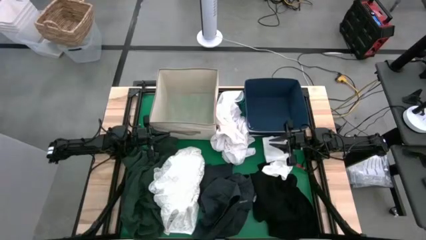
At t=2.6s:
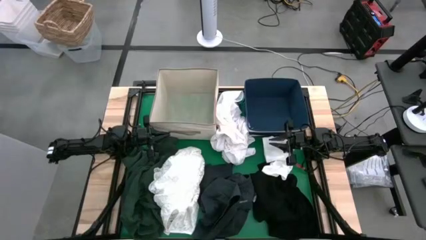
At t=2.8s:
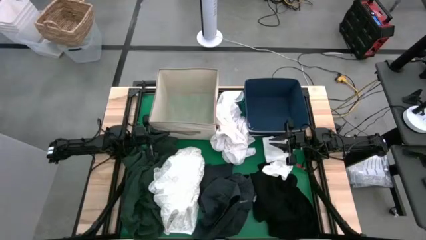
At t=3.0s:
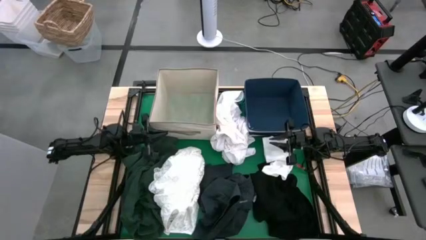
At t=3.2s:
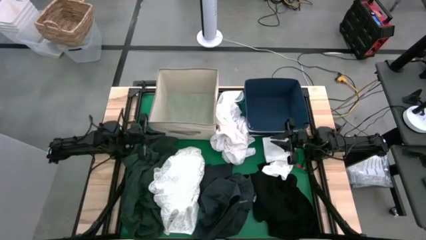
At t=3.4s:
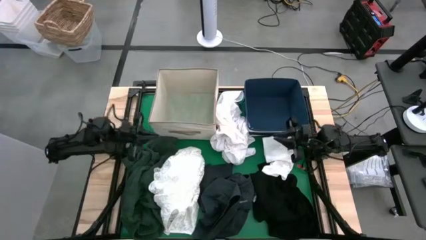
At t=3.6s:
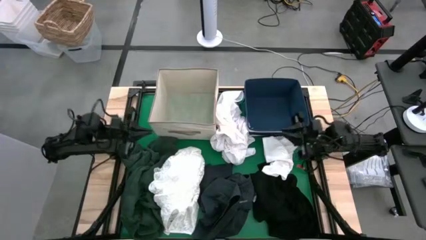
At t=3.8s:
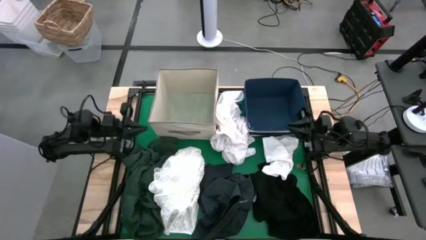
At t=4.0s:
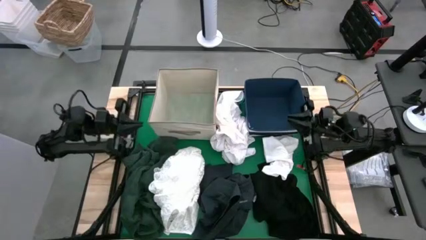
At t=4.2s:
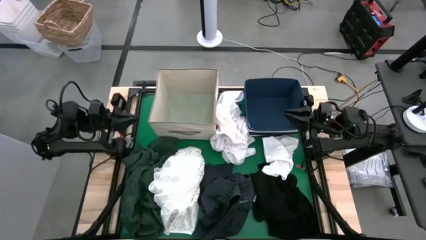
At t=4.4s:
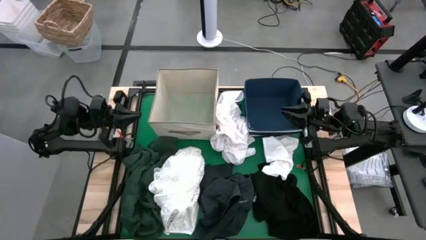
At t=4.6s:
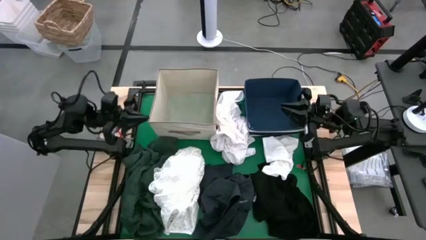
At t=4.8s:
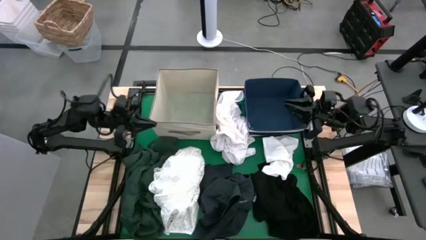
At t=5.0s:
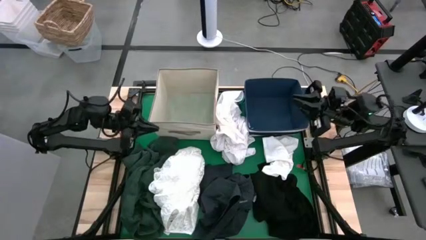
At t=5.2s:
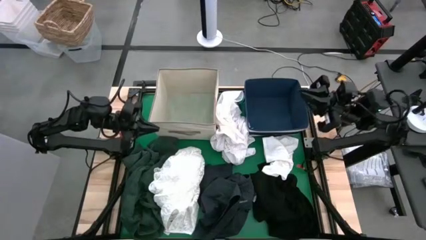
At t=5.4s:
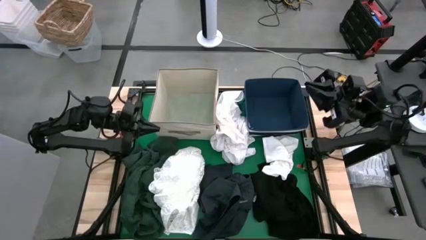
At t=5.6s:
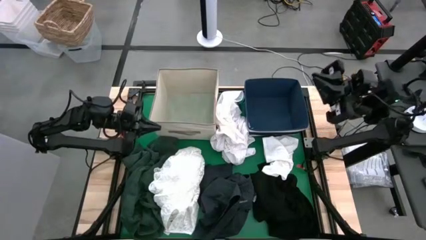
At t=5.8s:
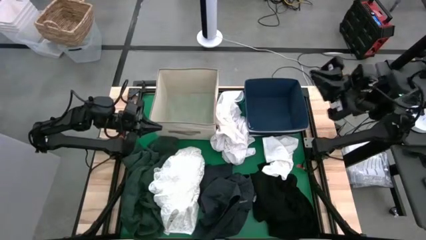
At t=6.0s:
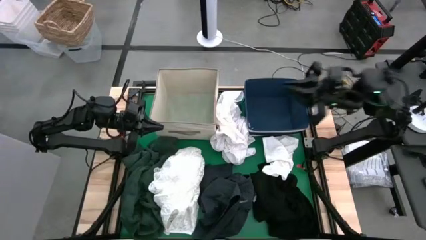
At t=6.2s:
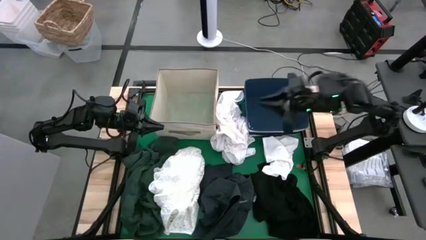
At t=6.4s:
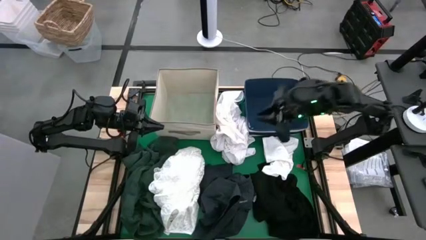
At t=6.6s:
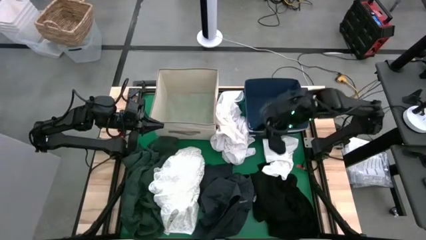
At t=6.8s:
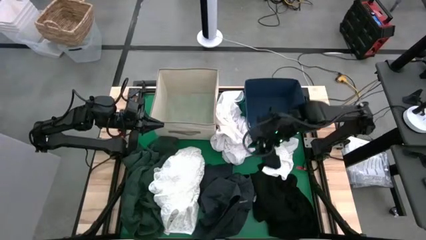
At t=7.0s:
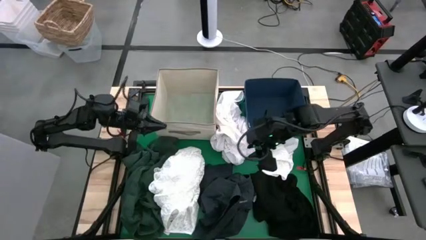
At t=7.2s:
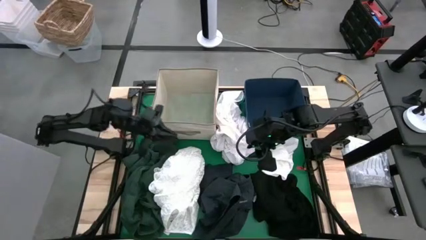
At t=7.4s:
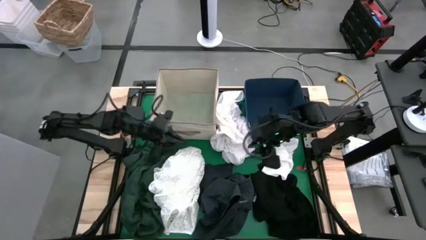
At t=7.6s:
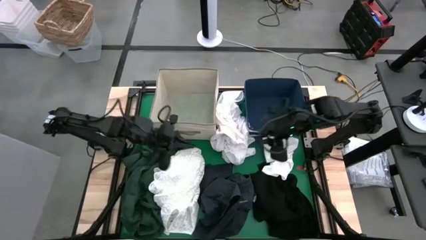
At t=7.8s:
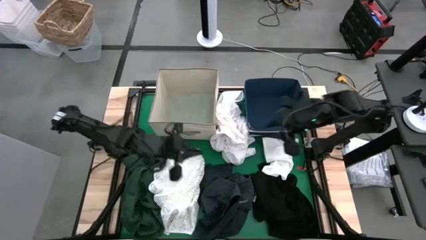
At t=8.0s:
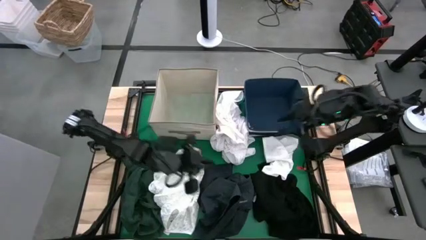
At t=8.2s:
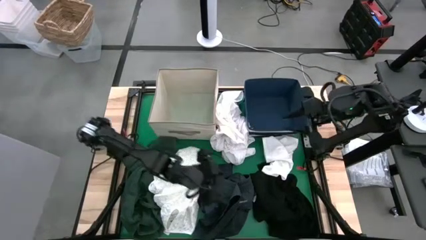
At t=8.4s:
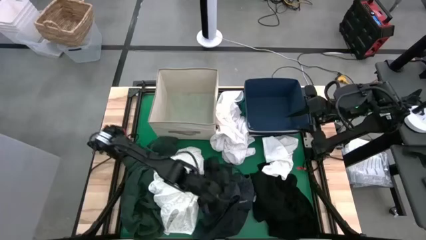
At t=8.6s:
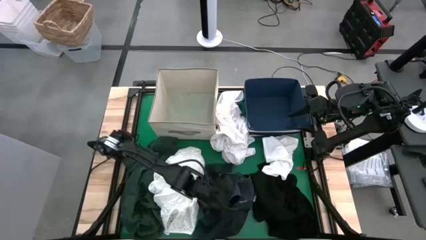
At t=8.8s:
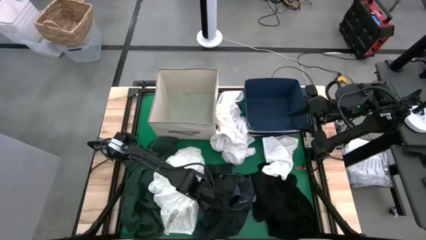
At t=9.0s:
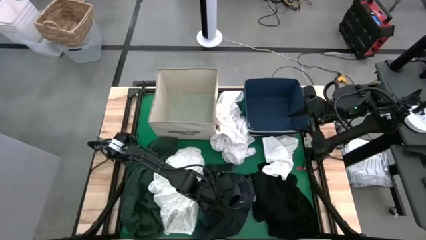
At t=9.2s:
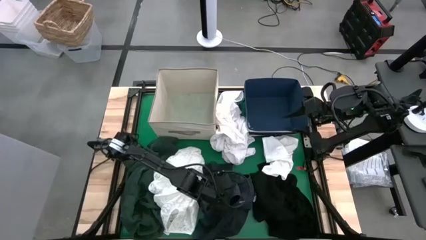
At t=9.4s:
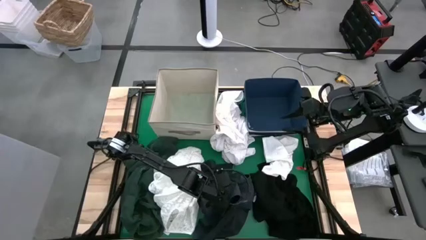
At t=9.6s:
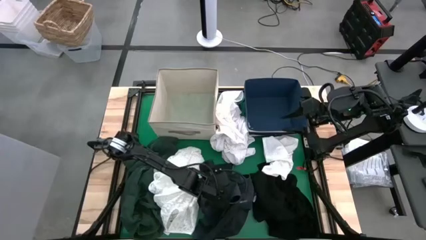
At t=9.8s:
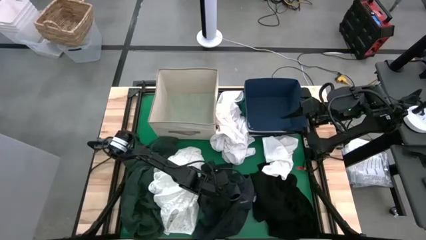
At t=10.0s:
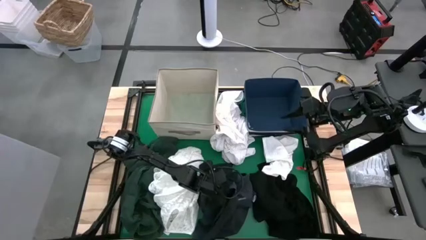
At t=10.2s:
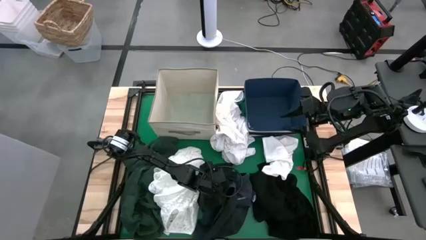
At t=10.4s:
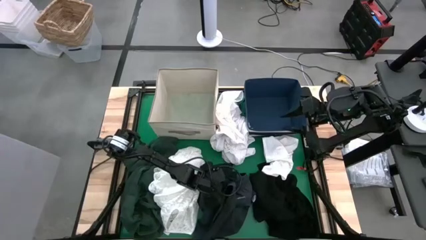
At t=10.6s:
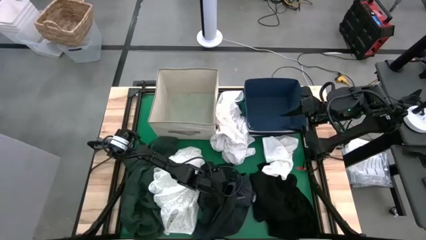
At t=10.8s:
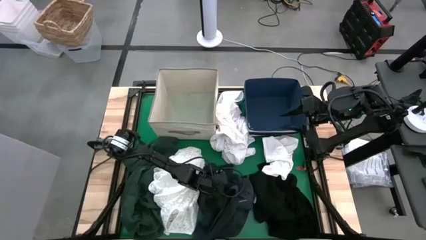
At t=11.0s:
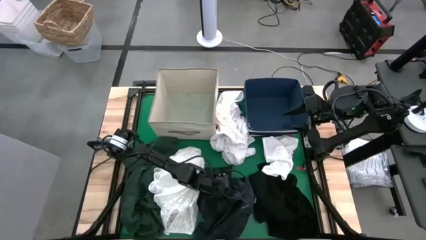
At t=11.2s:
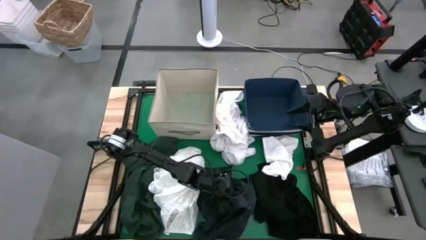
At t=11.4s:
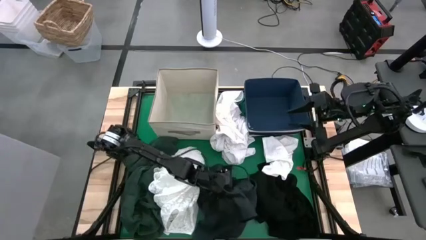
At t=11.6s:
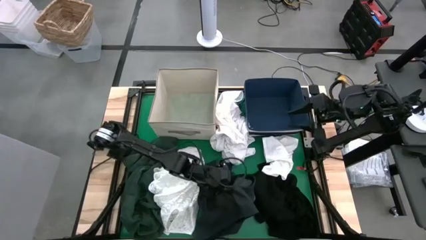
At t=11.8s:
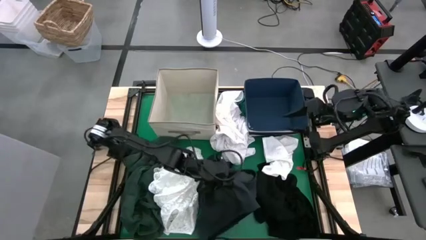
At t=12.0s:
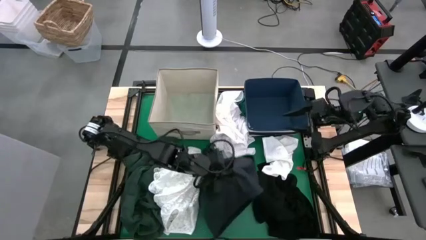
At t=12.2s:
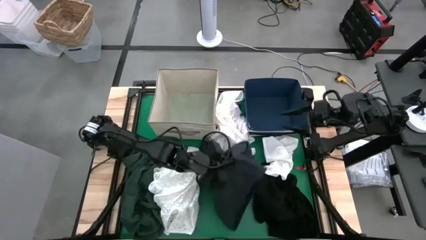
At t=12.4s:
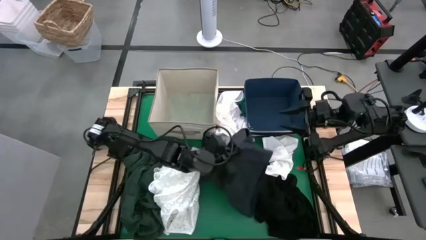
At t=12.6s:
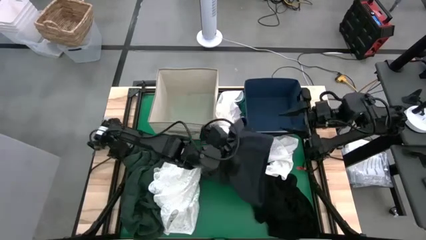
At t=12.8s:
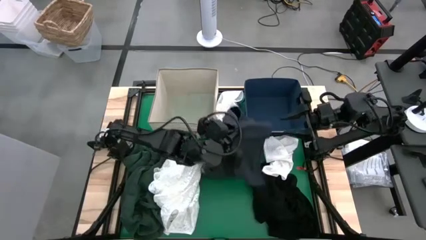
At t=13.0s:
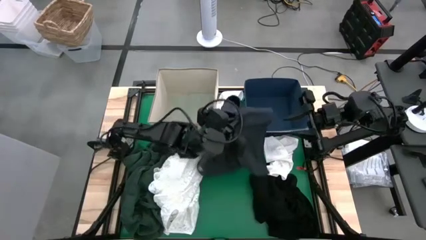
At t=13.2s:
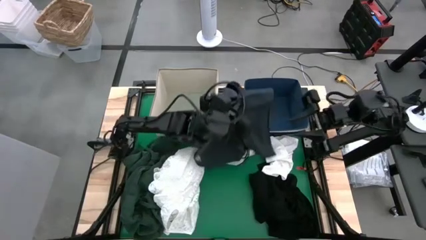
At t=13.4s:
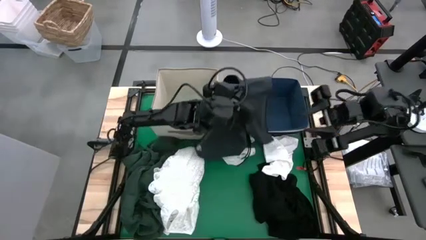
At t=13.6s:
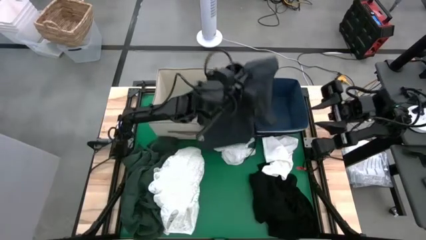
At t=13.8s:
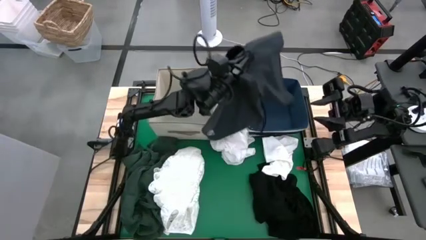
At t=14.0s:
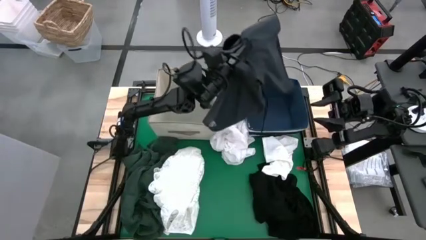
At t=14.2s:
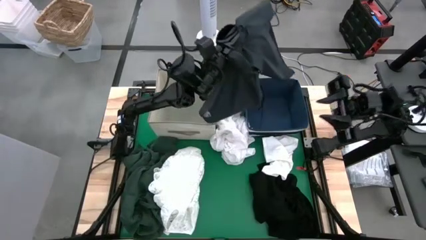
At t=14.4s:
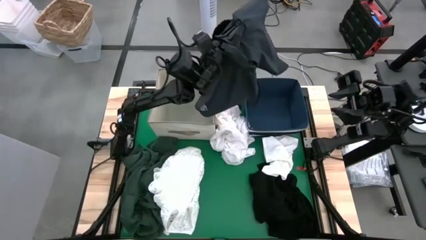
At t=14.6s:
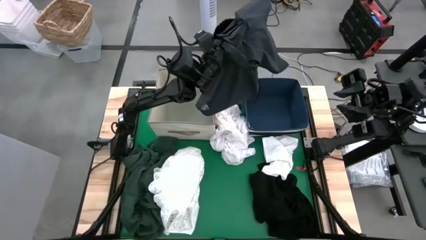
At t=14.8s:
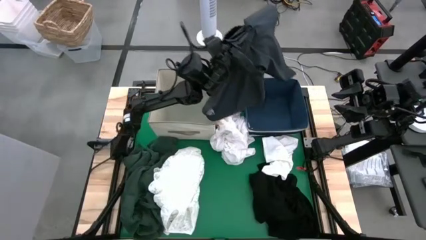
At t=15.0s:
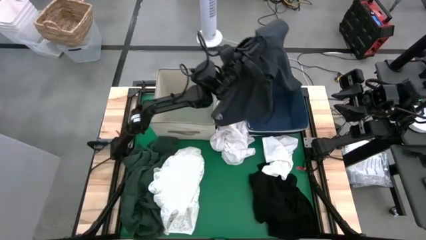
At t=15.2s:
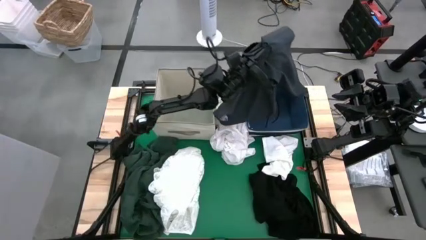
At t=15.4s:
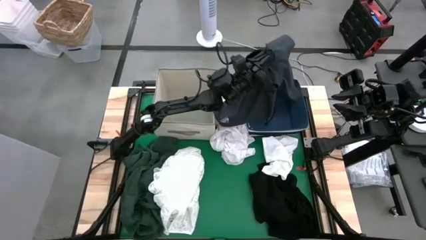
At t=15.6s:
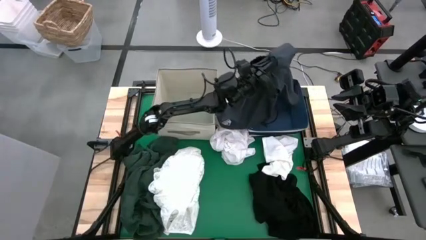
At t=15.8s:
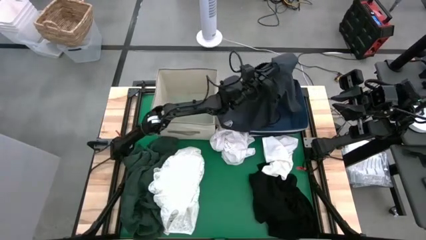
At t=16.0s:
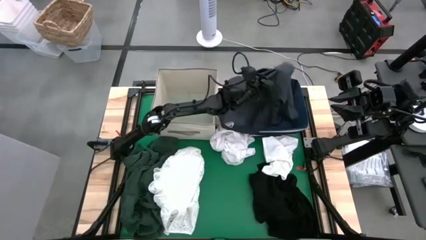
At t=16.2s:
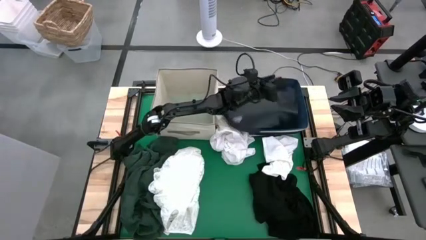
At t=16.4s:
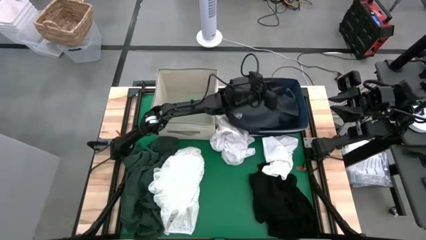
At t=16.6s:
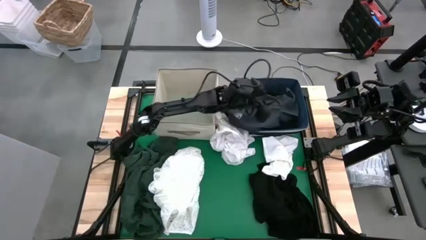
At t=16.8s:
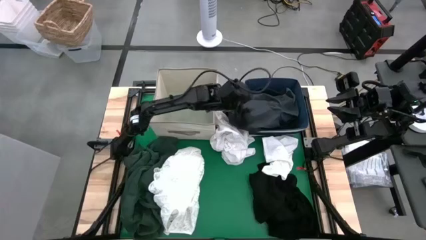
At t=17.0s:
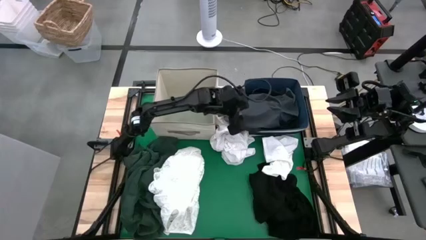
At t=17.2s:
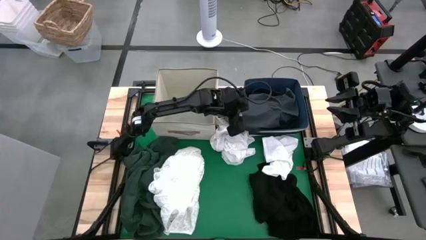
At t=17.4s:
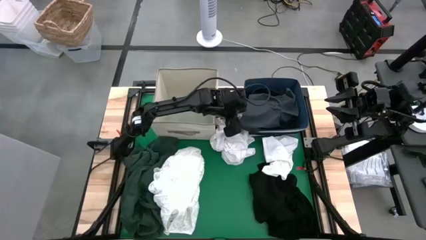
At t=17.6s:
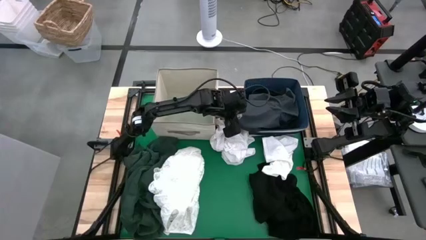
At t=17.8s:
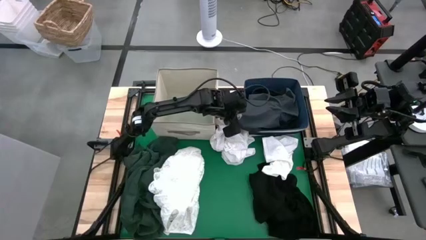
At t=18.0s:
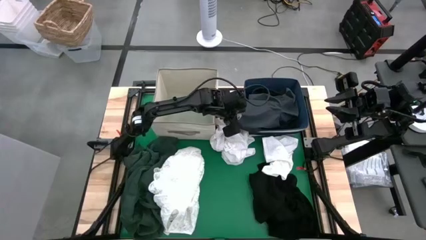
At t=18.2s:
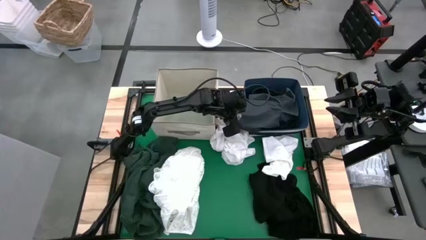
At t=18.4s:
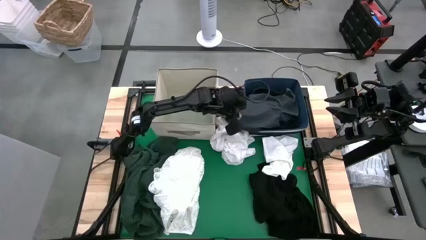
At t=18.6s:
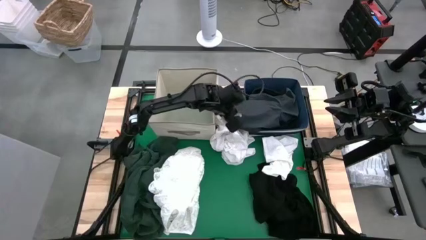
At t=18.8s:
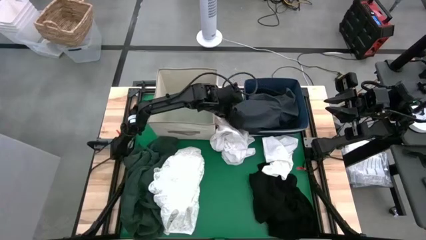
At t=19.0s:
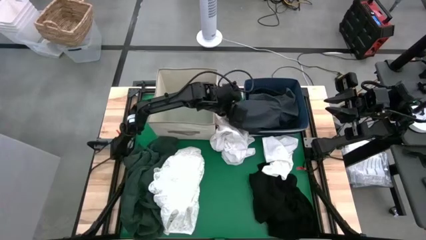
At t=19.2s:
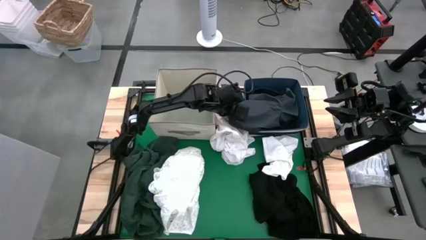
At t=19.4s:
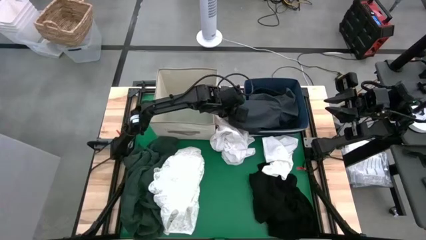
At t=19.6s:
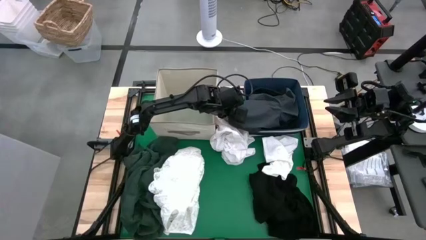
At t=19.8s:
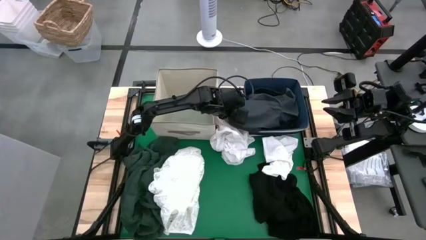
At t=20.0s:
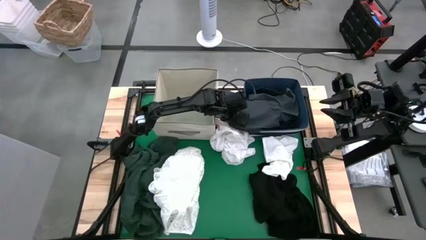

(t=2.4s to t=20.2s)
Put the gray shorts into the blue laundry bin
